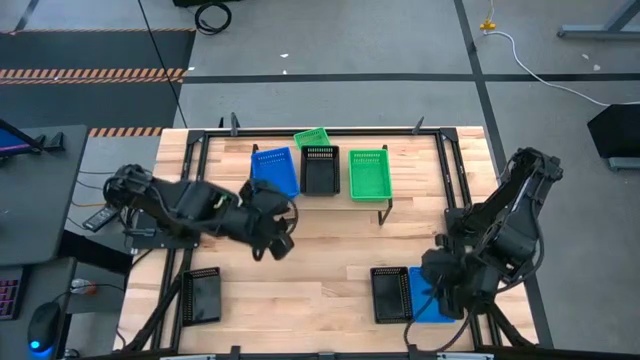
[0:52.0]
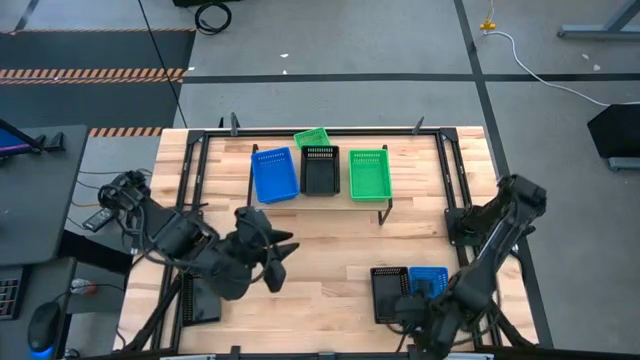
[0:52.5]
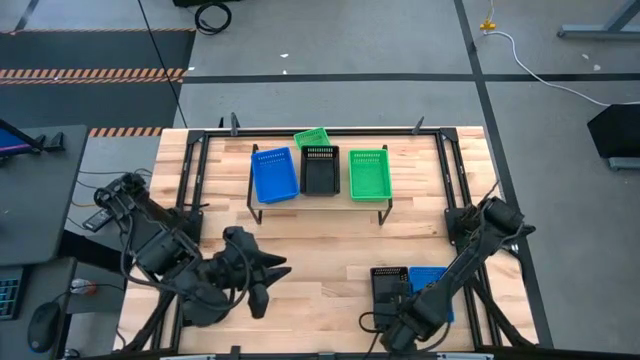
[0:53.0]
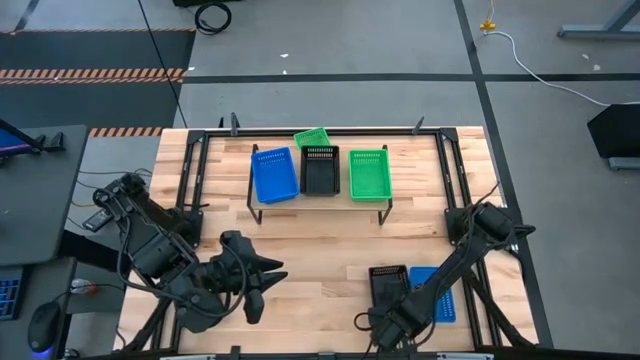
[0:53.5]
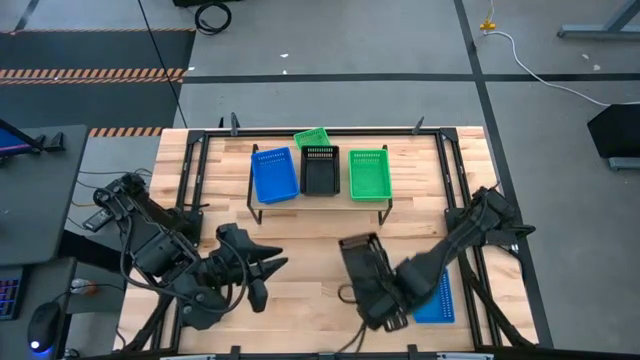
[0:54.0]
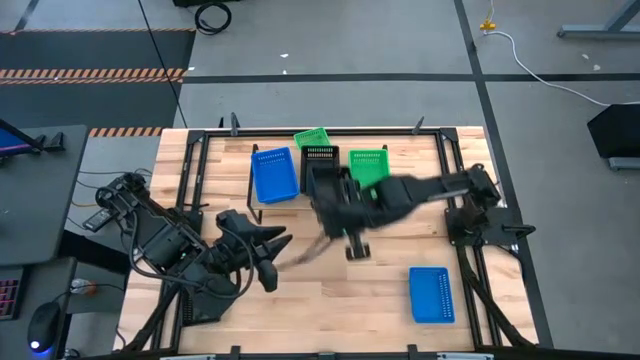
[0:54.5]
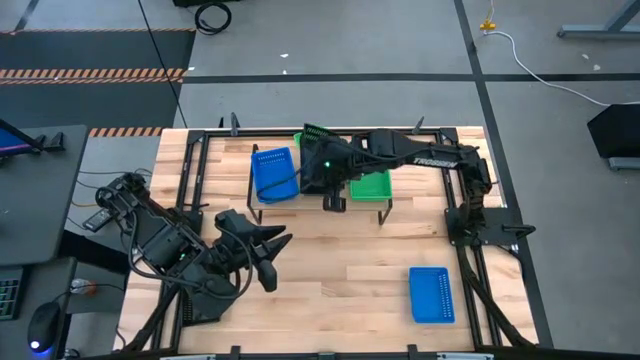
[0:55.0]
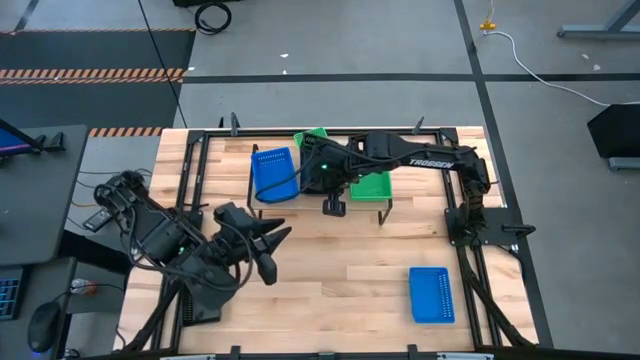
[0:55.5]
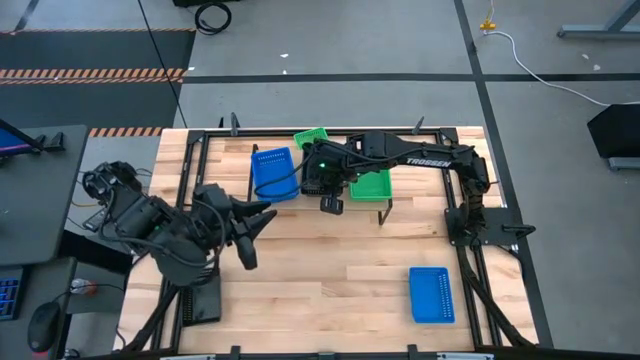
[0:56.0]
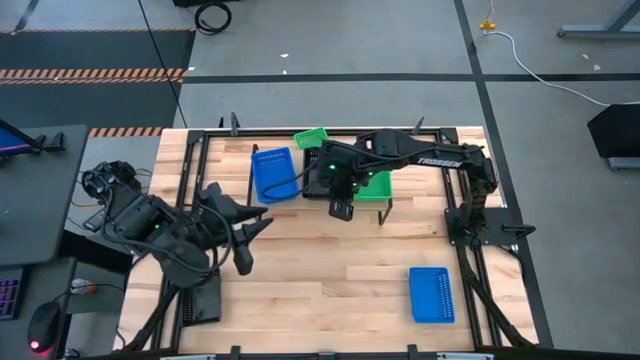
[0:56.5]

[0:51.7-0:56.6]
Task: Stack baskets on shelf by color
Stack the right black bin on top of the black bin on the shelf

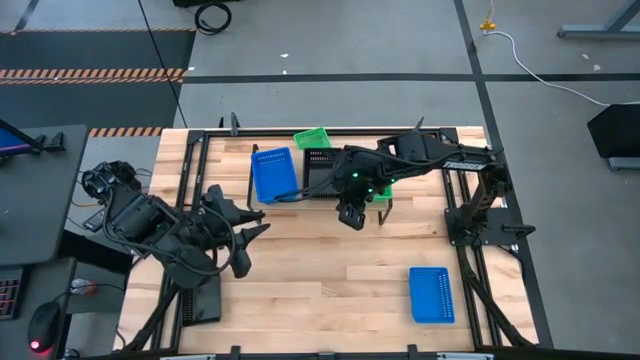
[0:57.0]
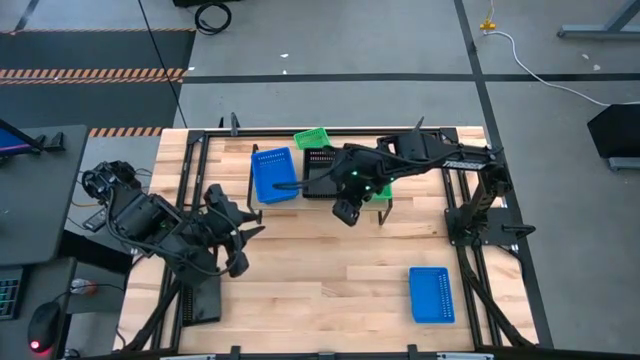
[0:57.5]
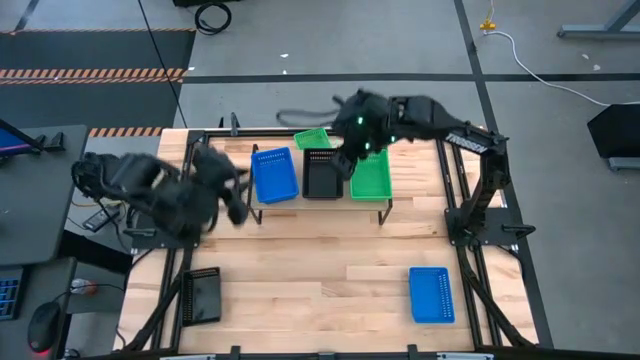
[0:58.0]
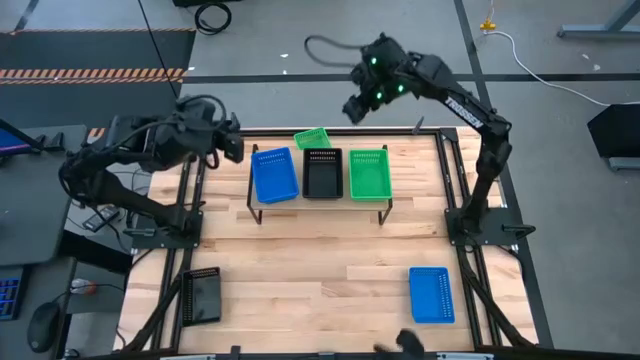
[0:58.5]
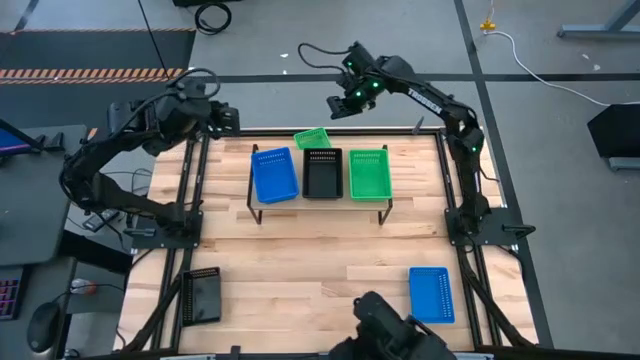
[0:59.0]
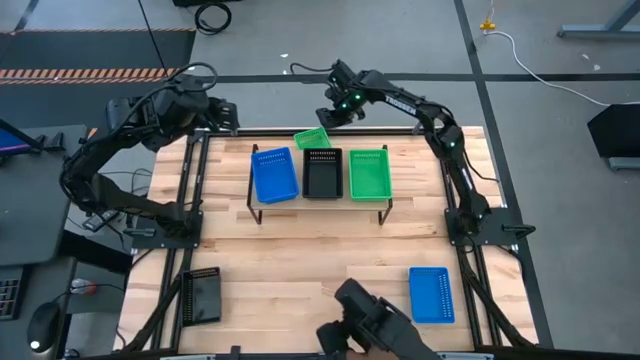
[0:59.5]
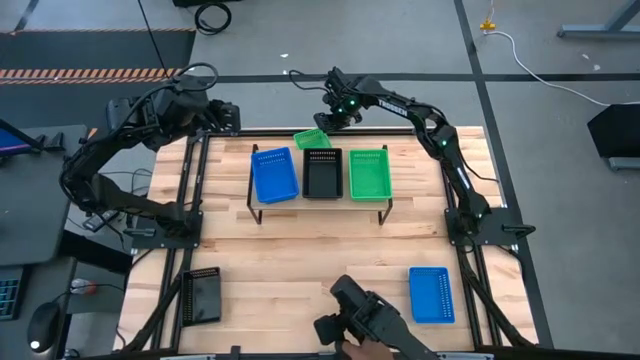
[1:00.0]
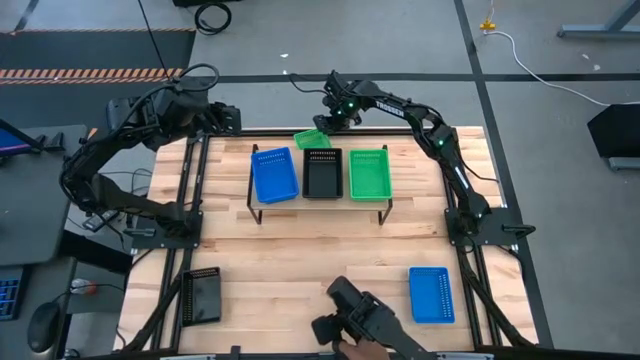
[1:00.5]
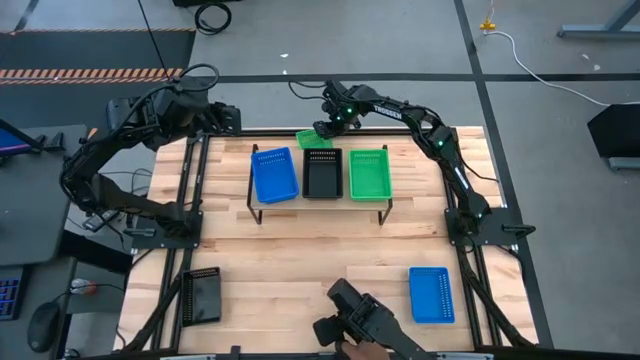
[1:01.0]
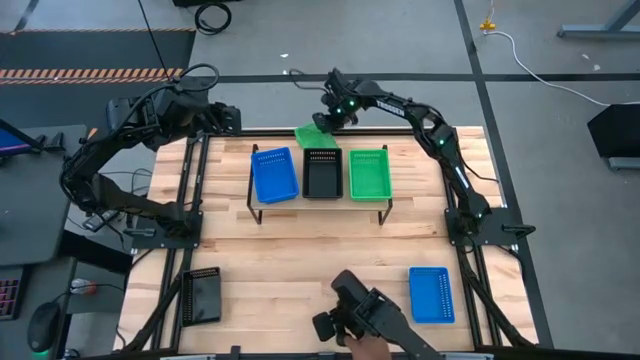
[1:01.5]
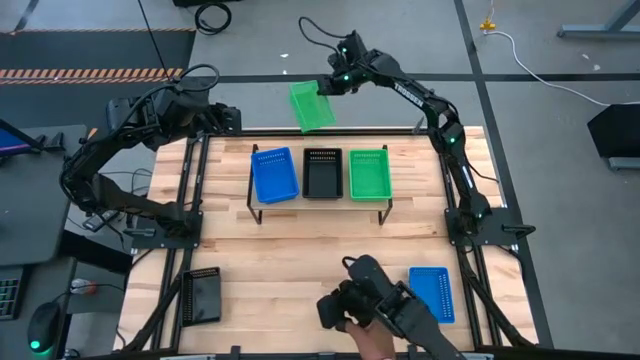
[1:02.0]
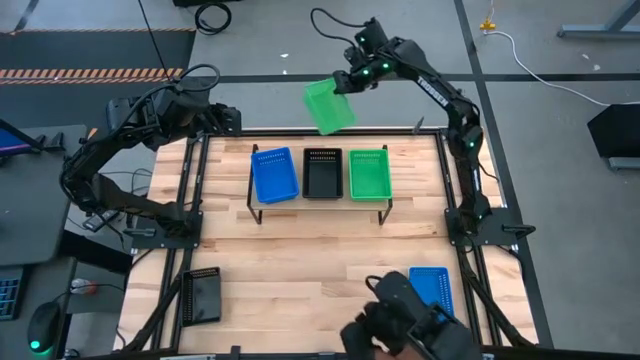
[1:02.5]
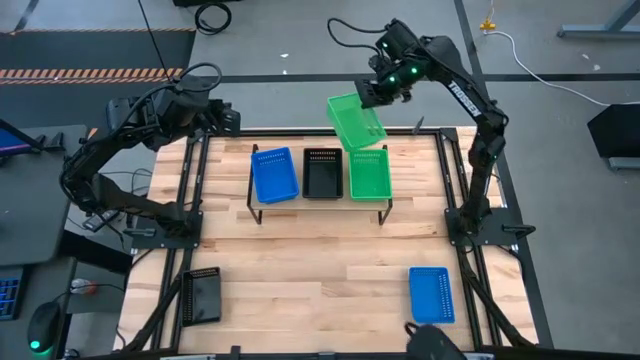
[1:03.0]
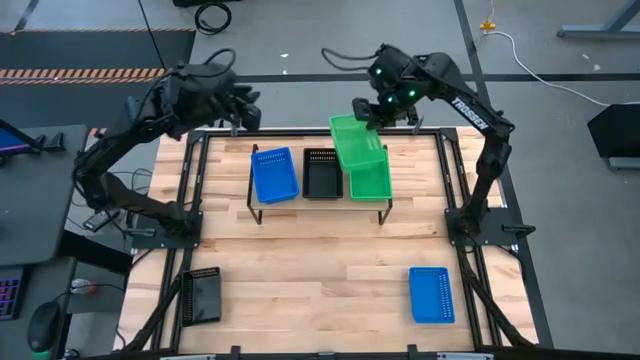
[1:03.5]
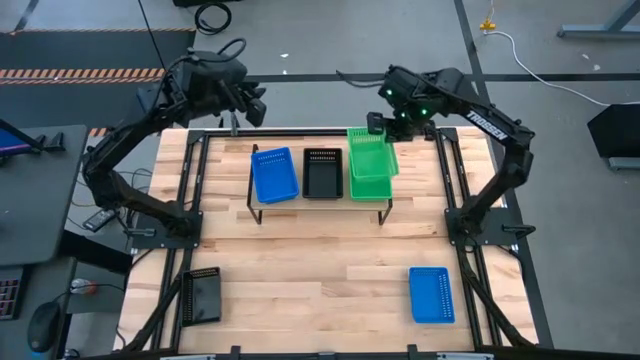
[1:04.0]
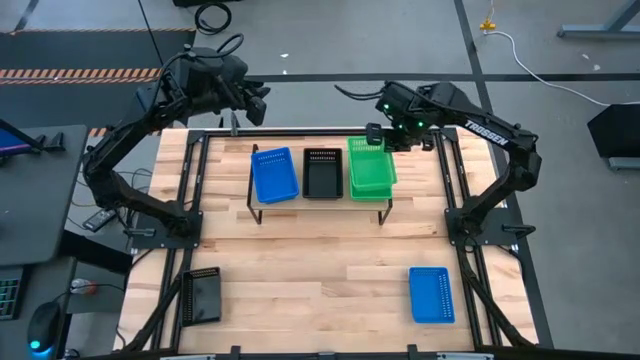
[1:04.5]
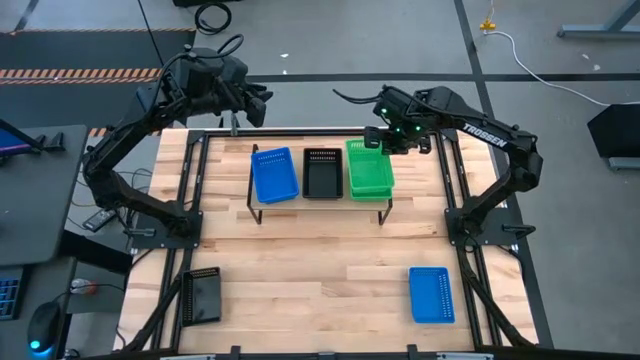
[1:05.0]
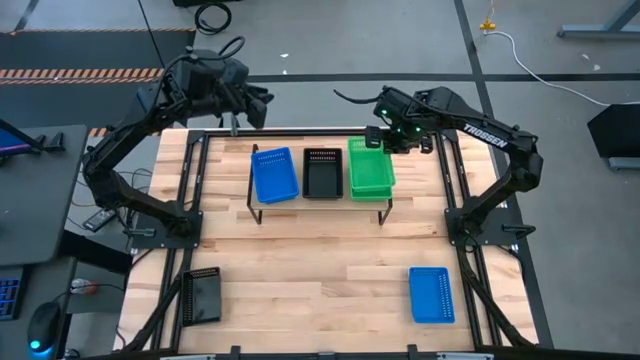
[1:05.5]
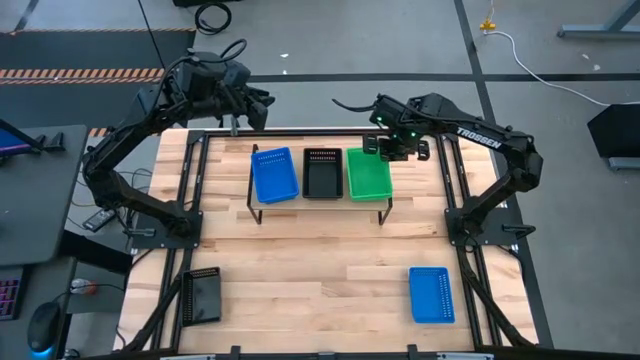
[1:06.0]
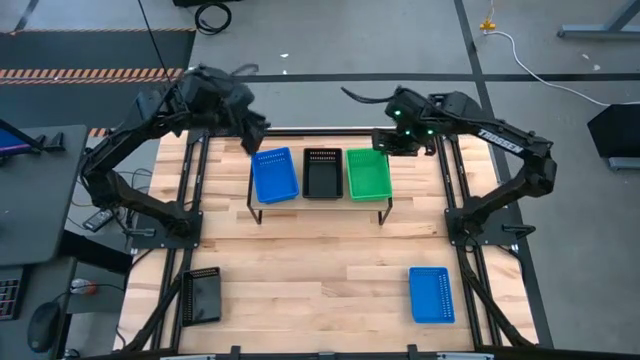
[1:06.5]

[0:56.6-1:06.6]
Stack the green bin on top of the green bin on the shelf

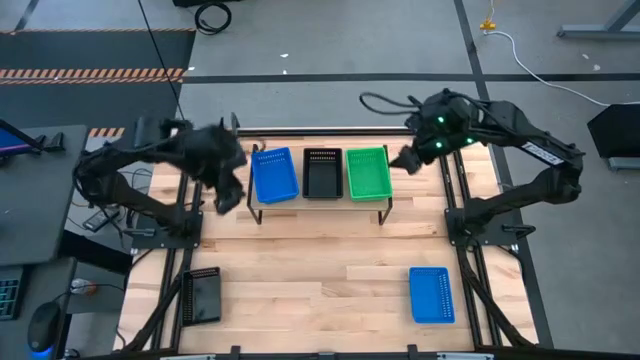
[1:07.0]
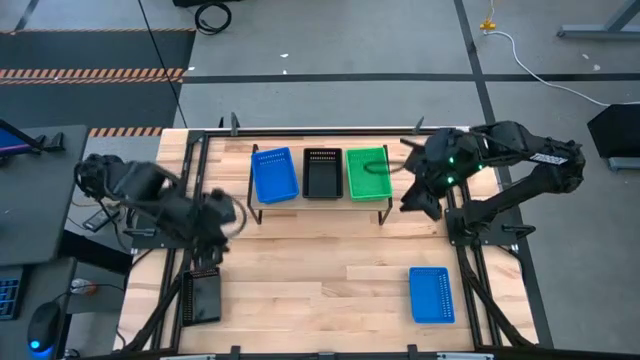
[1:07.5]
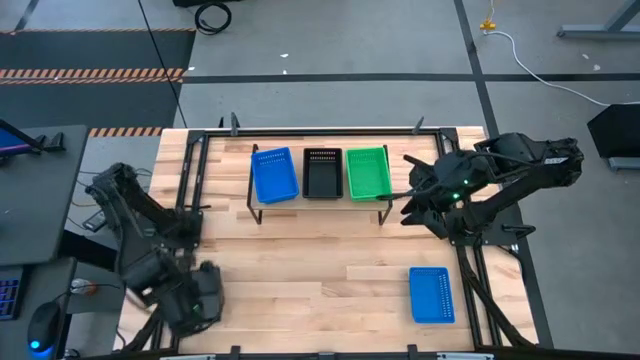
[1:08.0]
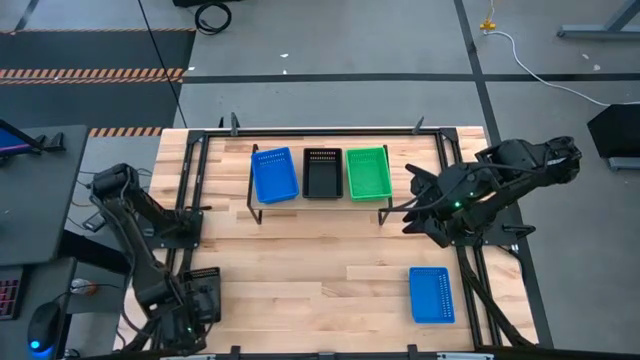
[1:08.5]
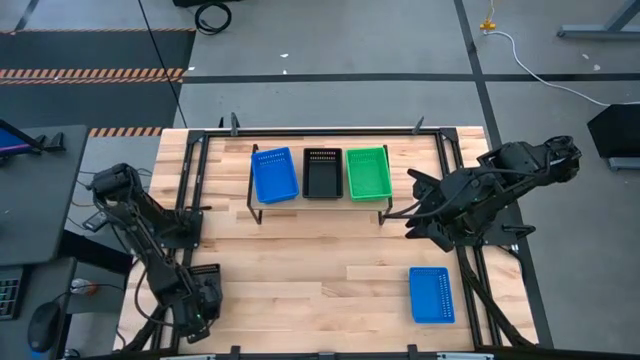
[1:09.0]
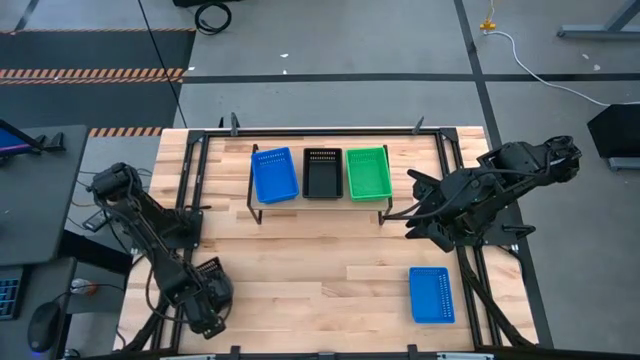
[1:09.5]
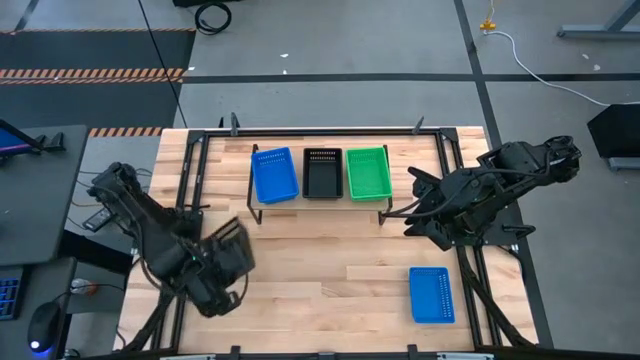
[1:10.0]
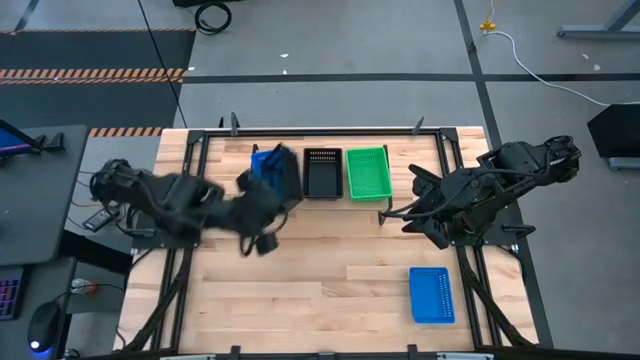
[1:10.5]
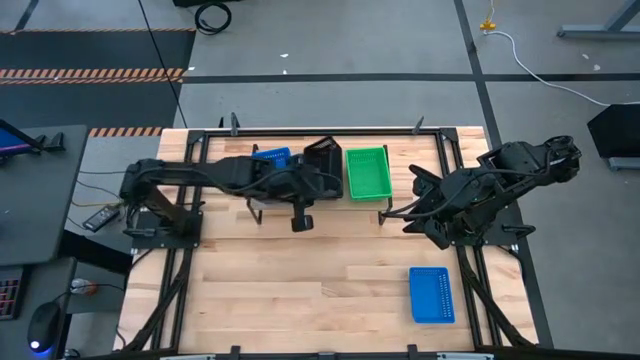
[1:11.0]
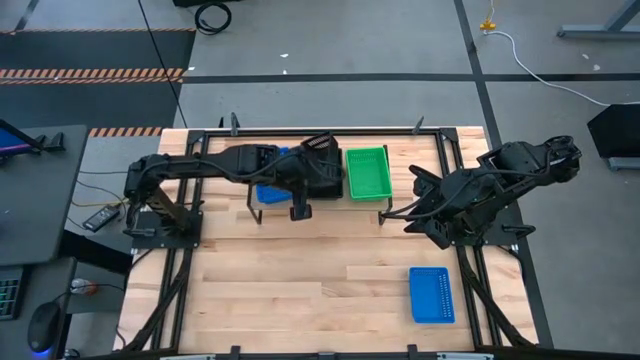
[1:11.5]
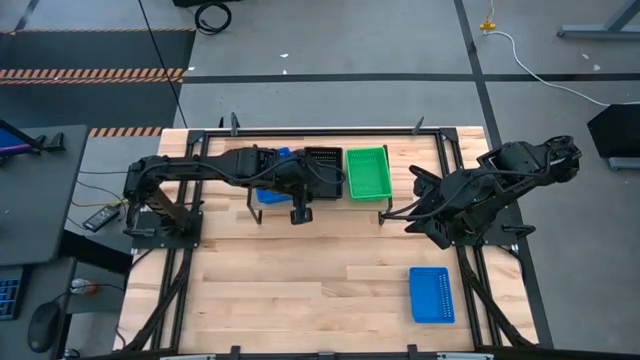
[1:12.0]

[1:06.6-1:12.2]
Stack the black bin on top of the black bin on the shelf
